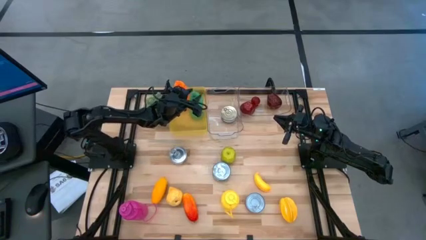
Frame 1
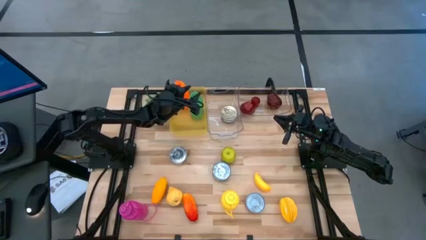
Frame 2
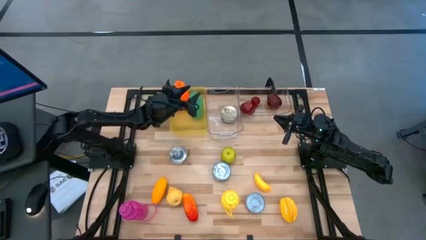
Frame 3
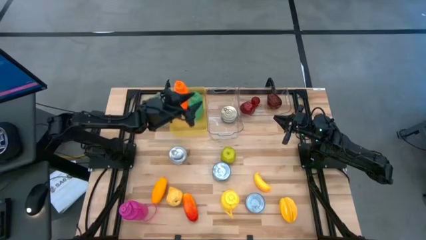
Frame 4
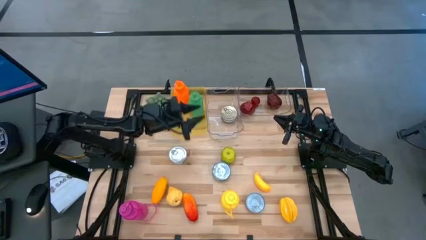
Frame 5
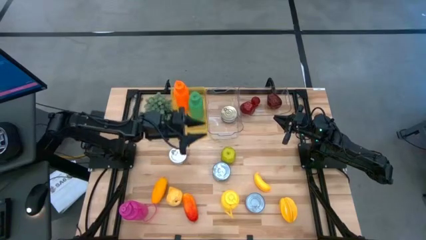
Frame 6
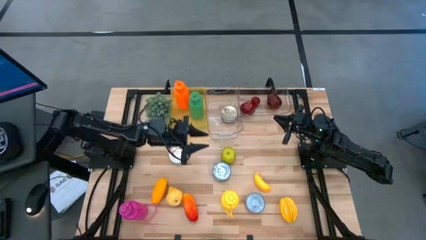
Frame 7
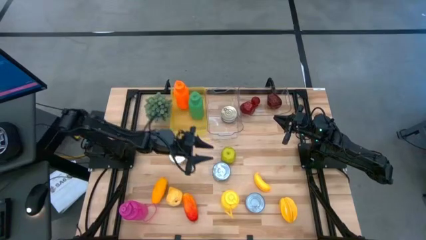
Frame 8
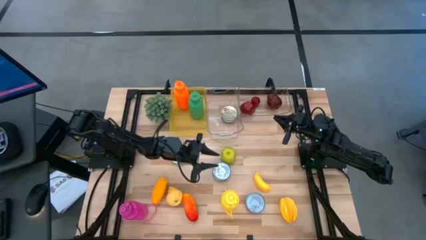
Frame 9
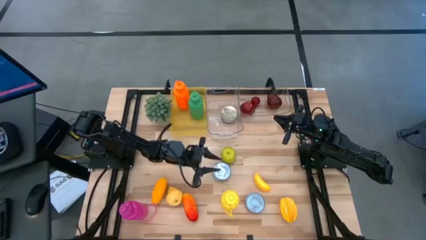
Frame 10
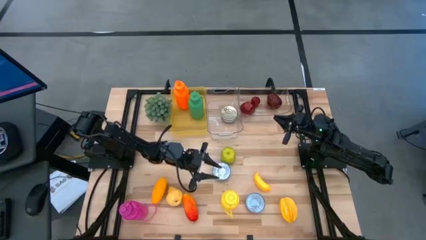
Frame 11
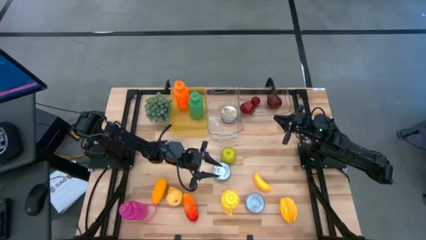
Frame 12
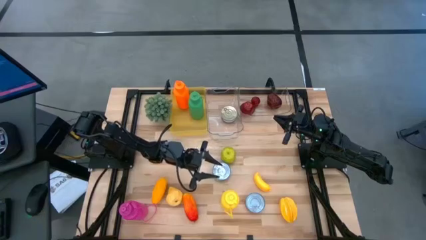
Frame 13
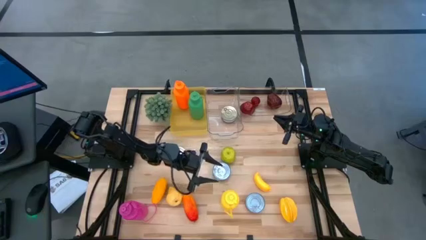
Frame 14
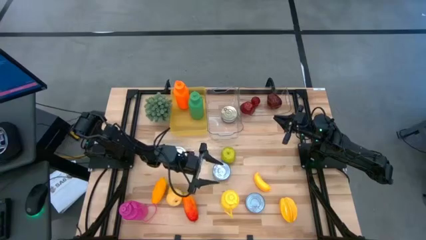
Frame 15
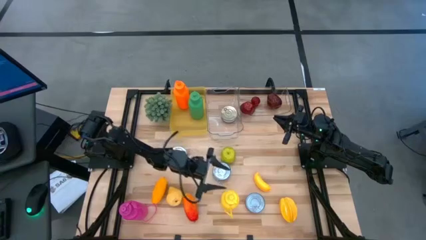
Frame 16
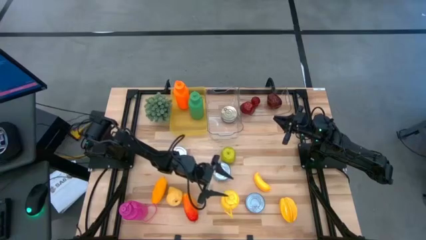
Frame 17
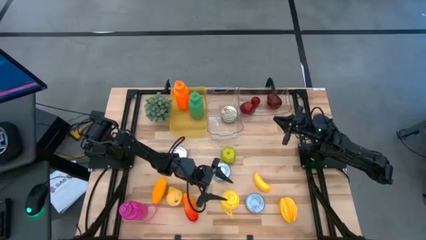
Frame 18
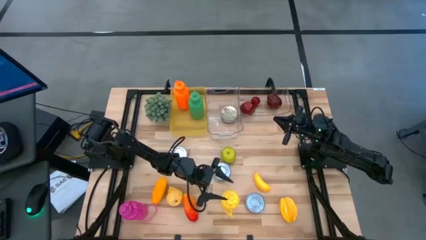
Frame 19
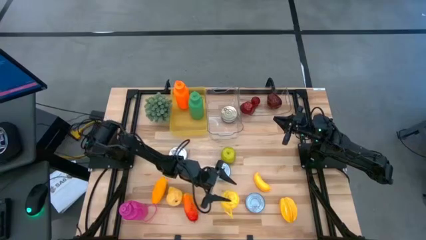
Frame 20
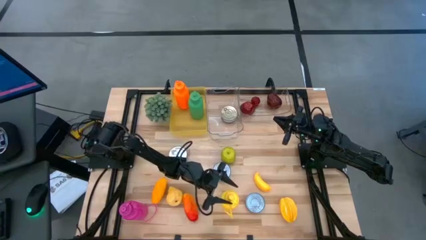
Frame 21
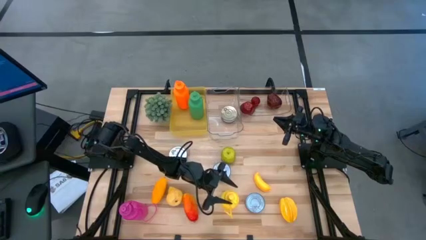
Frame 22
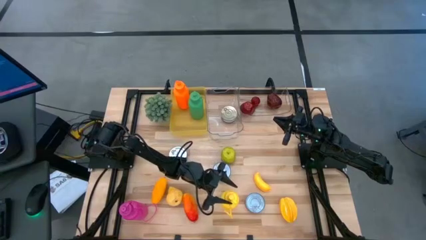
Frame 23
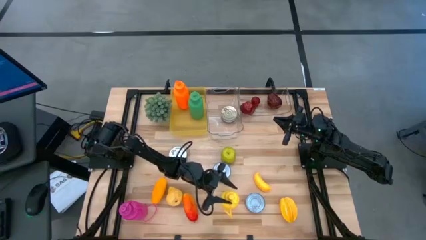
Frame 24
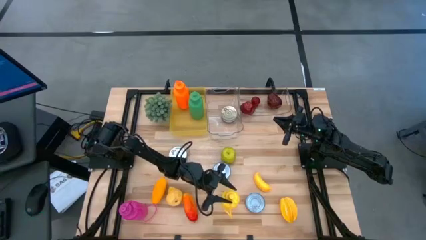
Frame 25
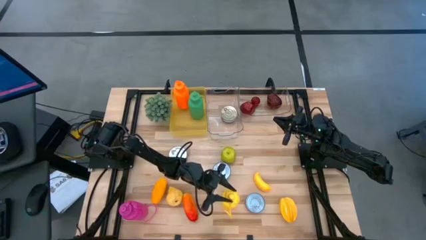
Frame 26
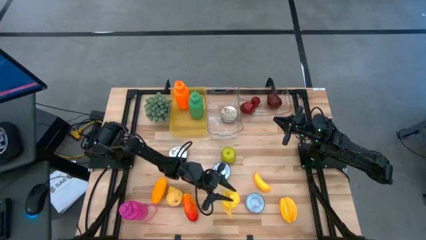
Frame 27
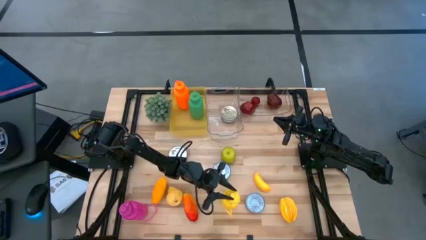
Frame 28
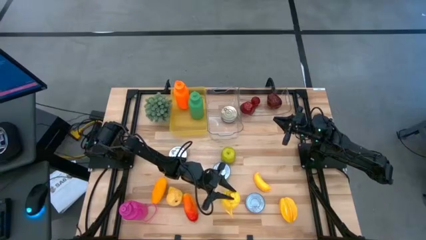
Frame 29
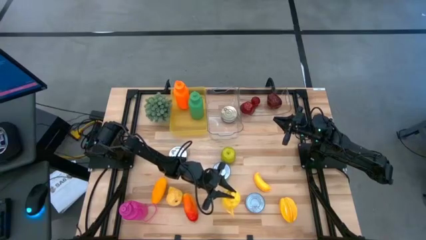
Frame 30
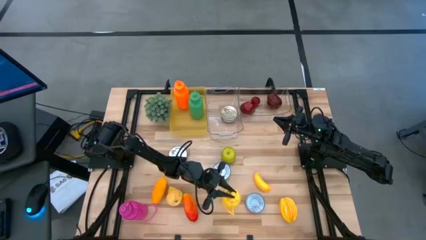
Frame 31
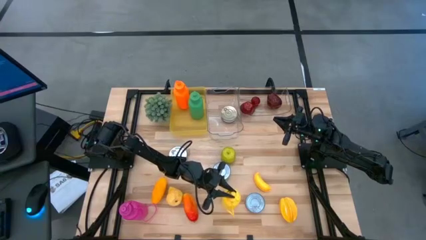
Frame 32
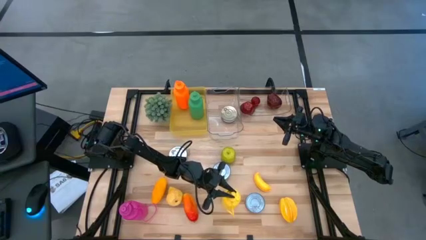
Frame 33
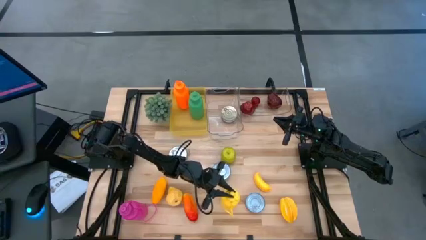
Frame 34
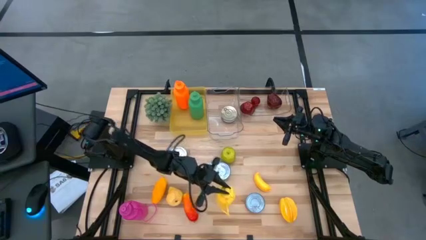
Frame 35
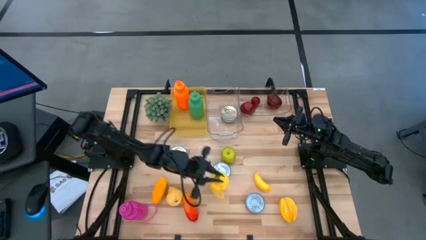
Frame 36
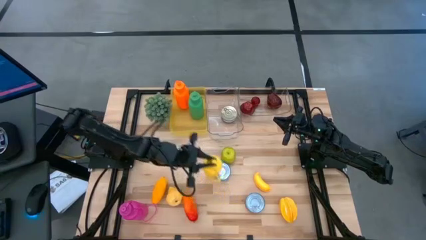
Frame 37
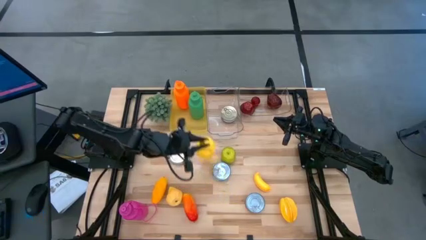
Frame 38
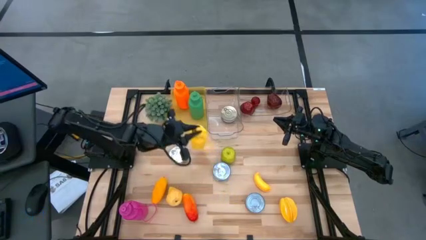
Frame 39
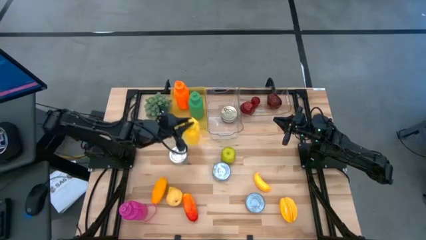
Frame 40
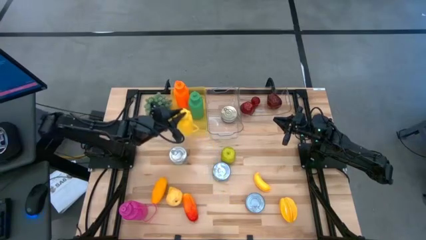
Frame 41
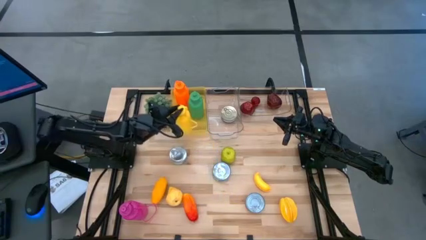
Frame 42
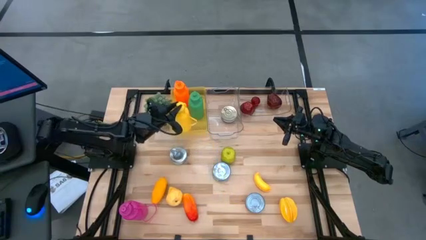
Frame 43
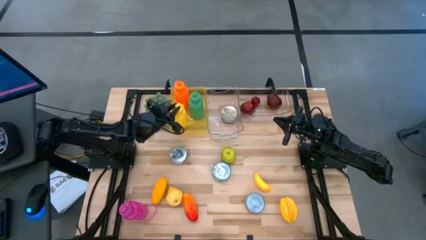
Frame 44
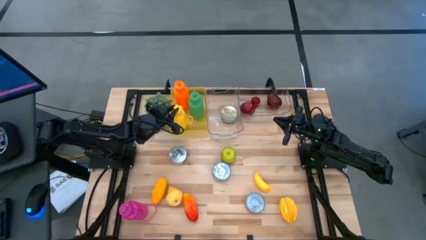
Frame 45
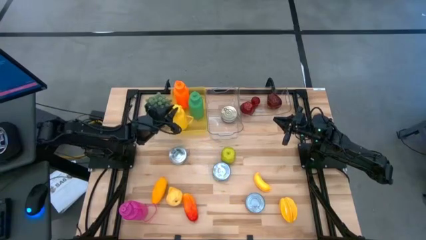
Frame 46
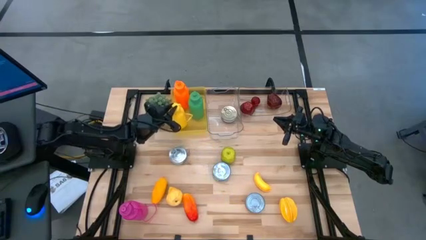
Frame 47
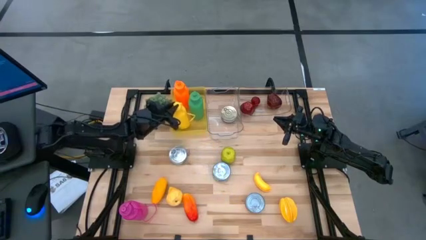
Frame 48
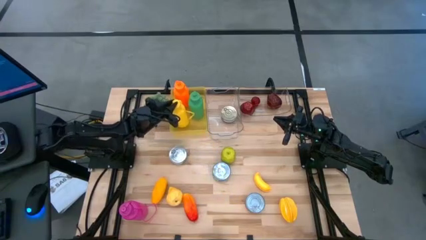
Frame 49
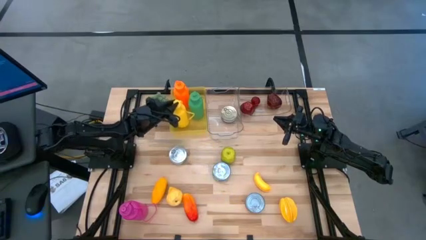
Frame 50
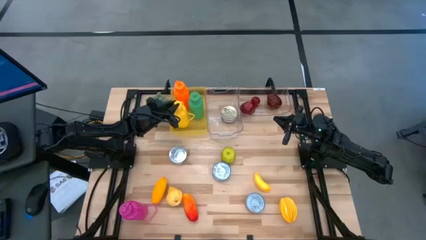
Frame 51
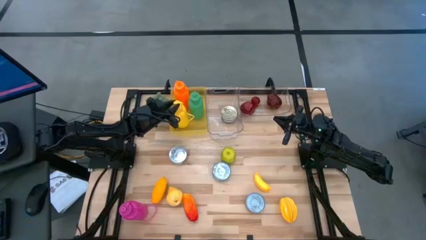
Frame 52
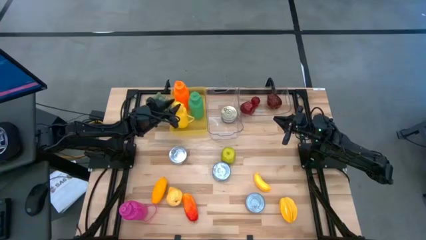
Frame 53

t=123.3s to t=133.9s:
Task: Pick & Place Food Item
Put the yellow bottle into the yellow bin

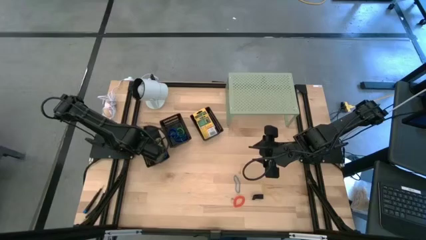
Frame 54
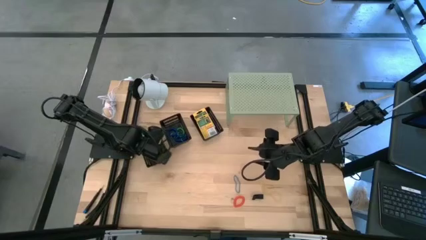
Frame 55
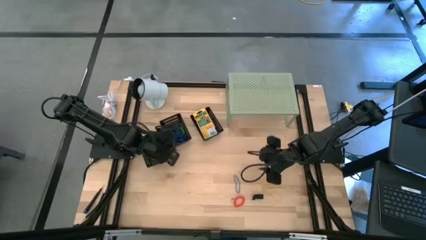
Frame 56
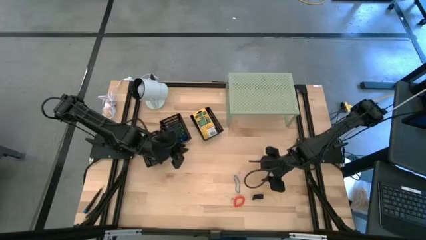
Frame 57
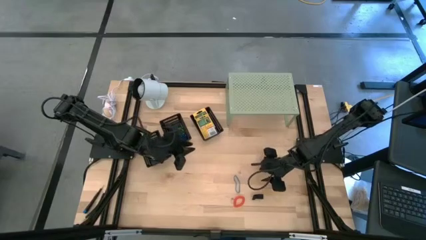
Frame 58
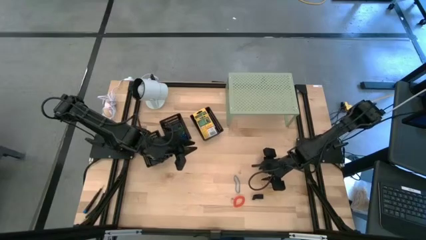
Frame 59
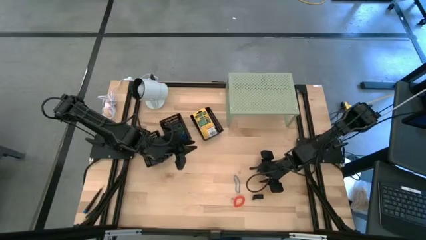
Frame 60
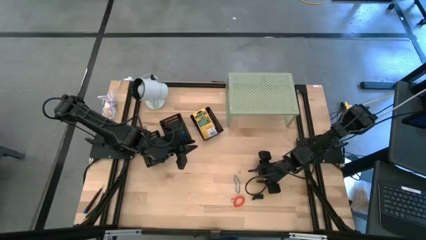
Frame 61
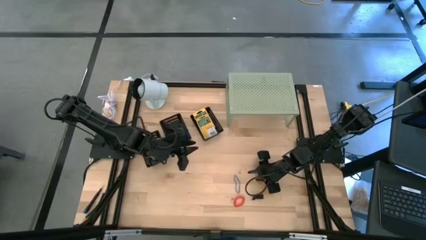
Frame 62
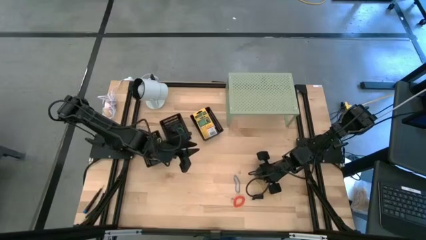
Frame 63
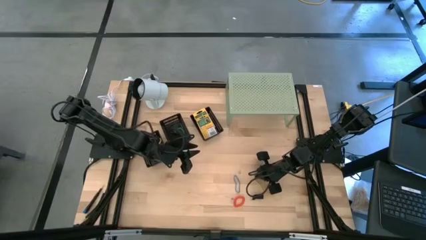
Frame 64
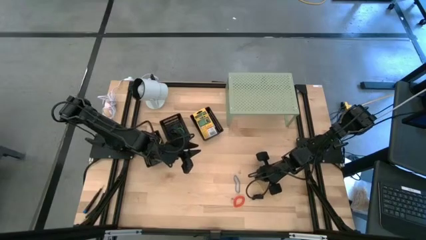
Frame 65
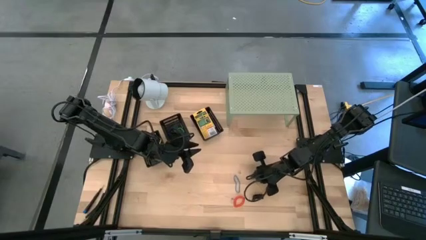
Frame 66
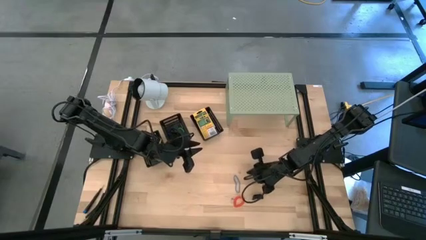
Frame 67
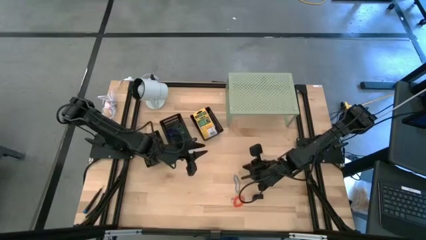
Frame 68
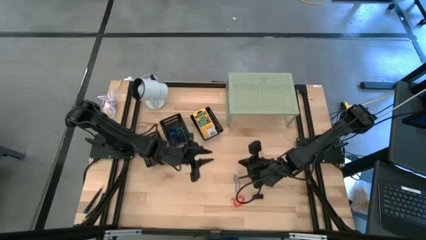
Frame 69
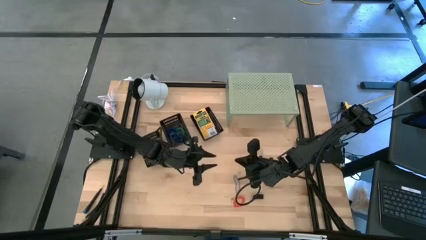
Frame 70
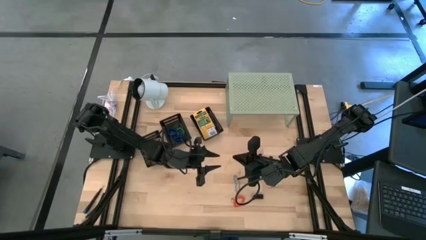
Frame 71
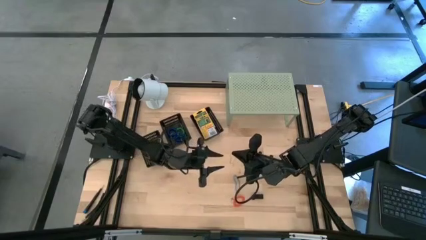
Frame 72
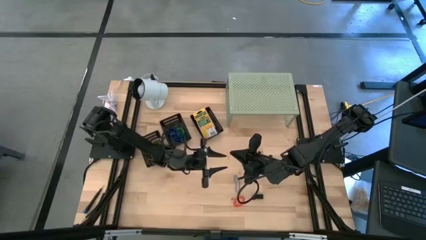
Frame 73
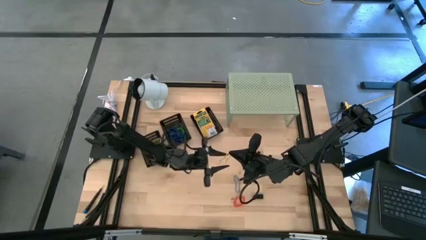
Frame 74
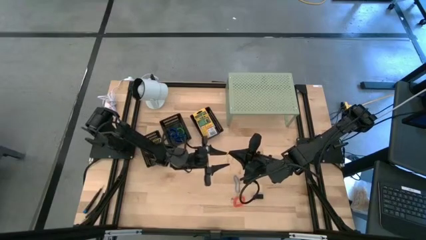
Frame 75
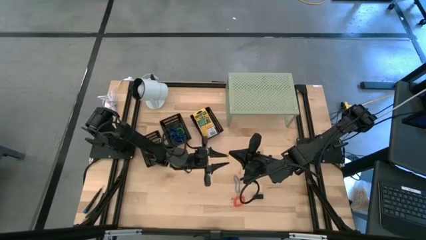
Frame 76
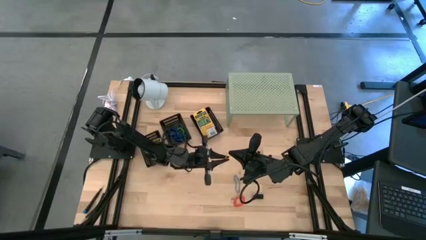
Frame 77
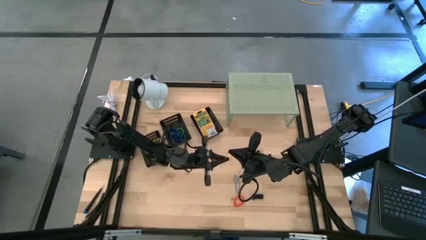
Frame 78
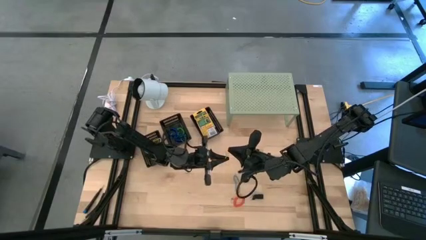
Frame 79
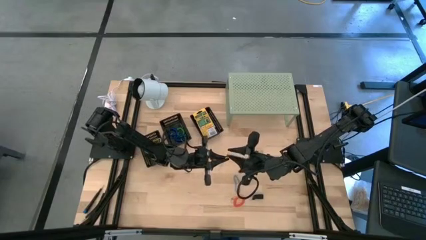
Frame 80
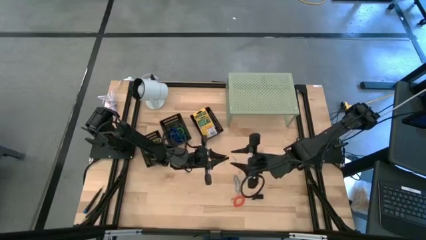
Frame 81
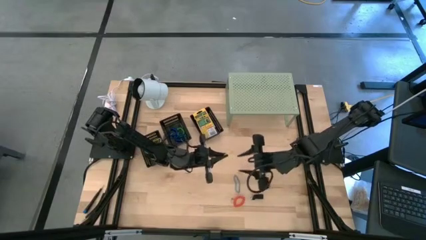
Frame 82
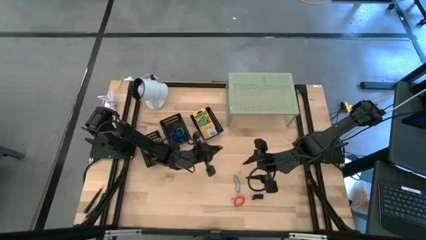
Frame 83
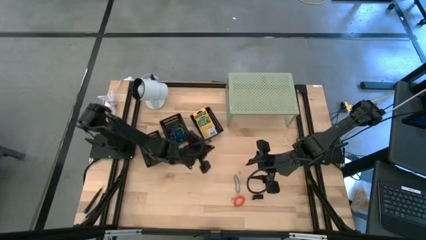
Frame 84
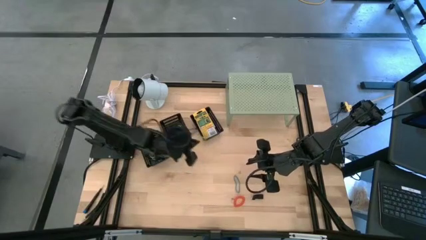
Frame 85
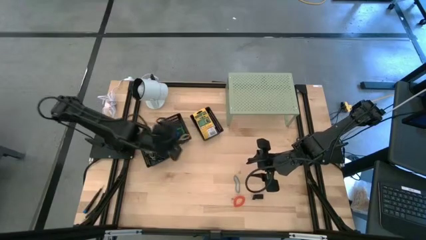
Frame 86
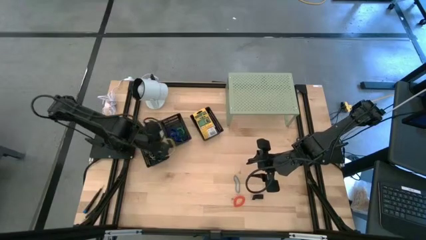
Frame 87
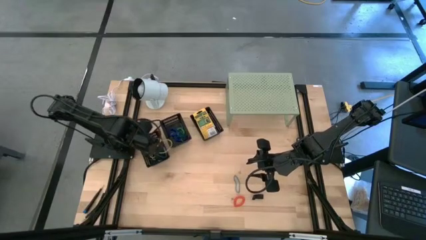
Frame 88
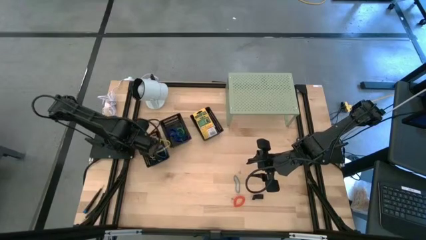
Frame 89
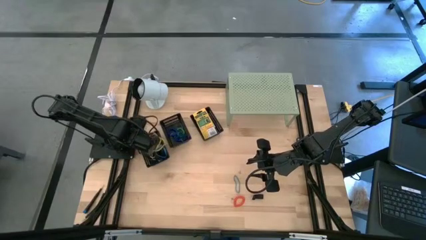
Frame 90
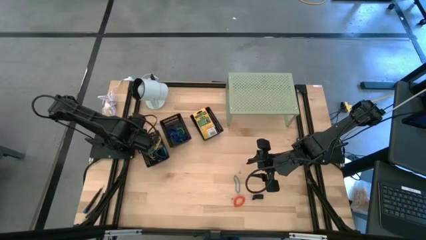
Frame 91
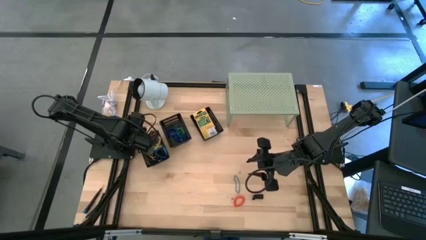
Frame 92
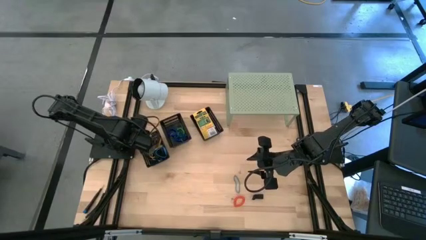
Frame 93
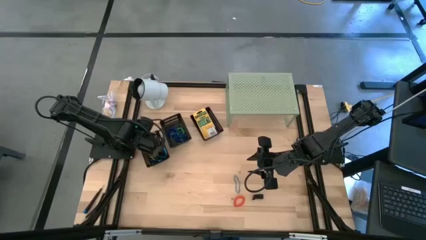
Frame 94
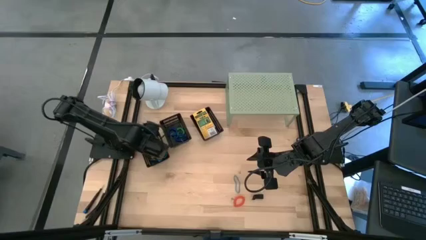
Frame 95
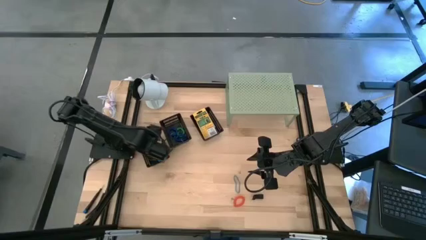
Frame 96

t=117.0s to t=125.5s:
Task: Pick & Place Office Desk Supplies
Put the yellow rubber band into the left black basket
